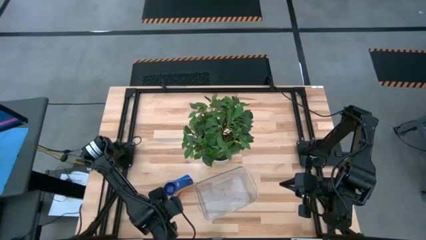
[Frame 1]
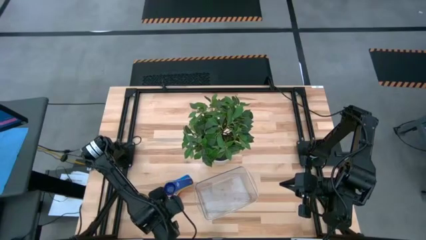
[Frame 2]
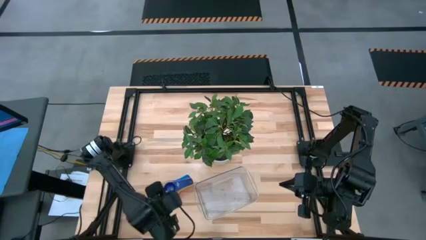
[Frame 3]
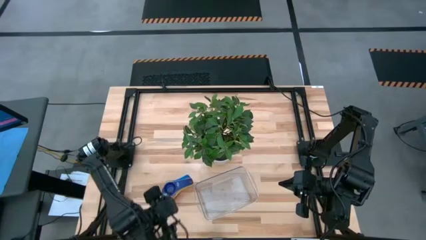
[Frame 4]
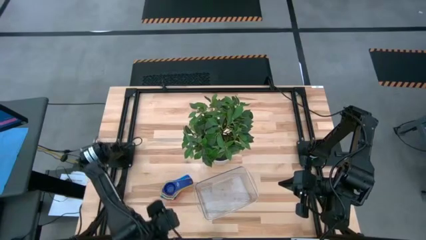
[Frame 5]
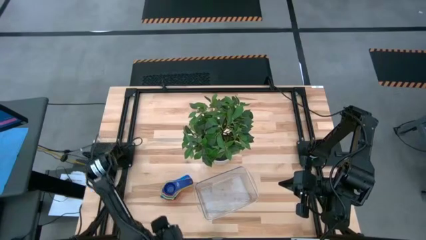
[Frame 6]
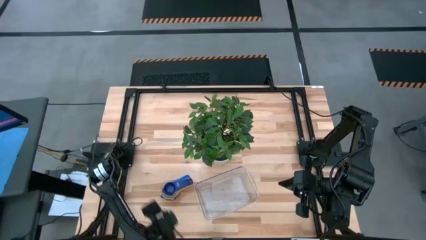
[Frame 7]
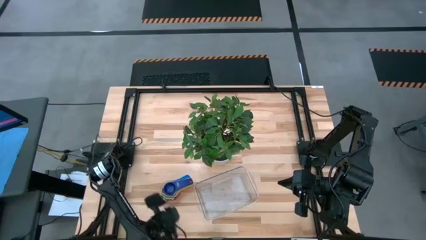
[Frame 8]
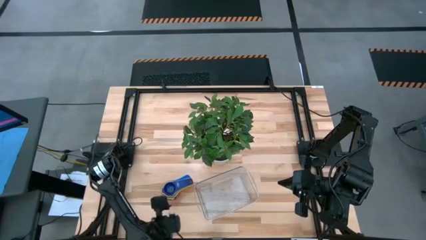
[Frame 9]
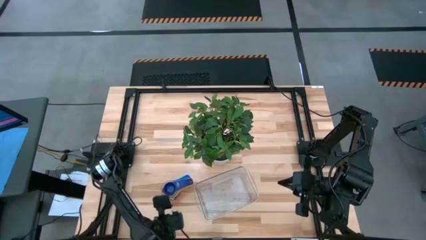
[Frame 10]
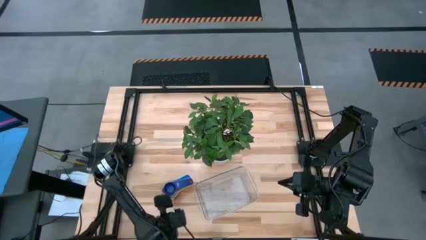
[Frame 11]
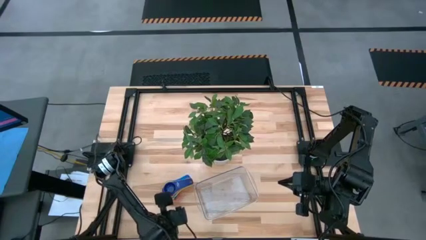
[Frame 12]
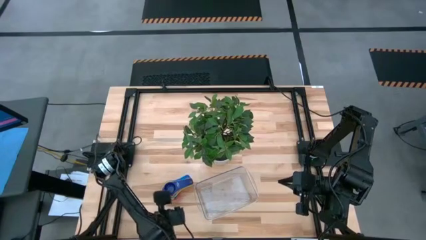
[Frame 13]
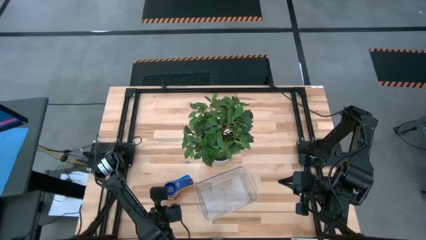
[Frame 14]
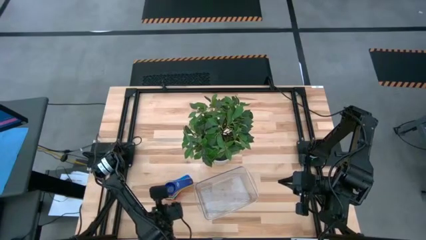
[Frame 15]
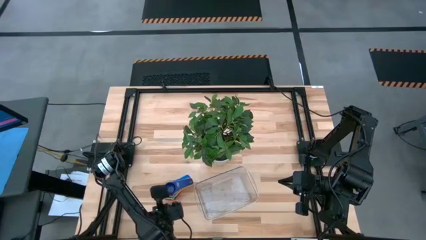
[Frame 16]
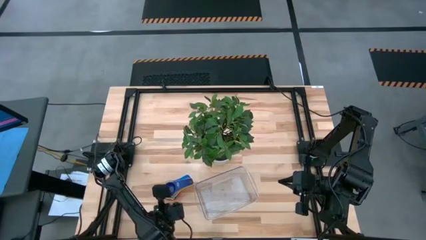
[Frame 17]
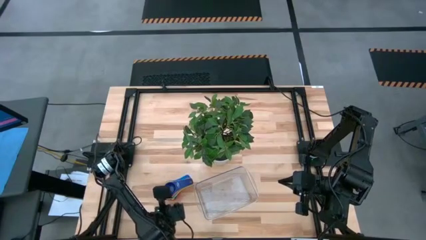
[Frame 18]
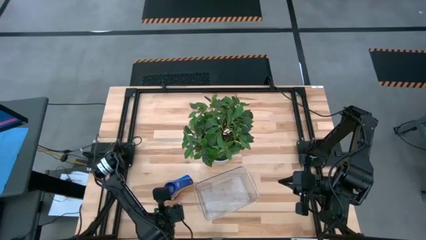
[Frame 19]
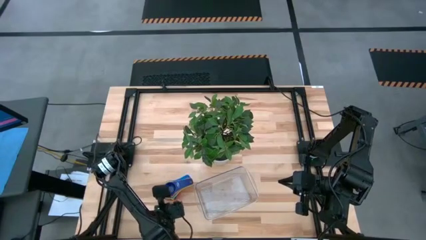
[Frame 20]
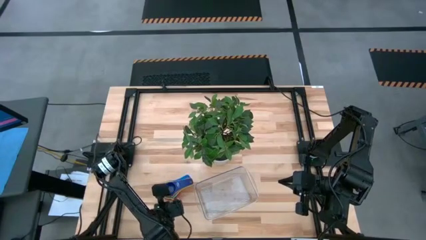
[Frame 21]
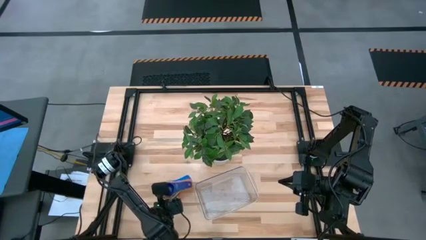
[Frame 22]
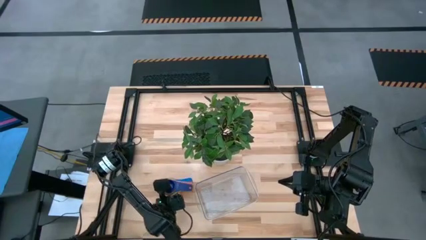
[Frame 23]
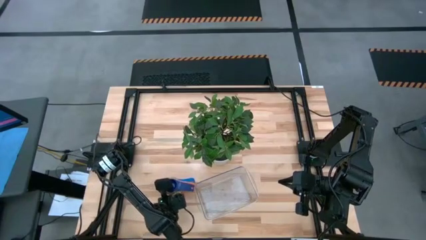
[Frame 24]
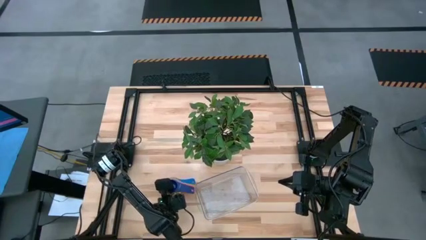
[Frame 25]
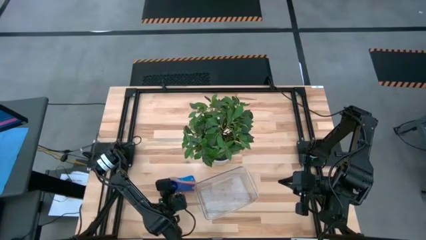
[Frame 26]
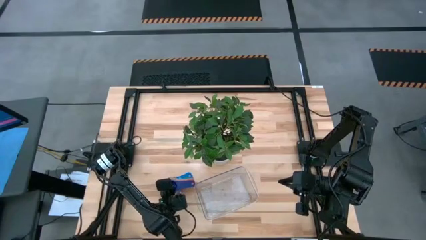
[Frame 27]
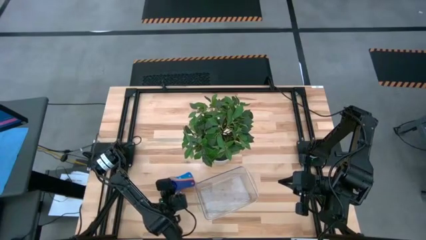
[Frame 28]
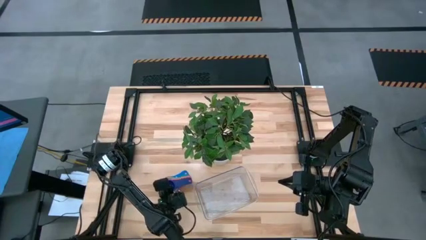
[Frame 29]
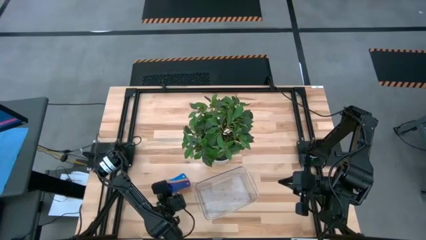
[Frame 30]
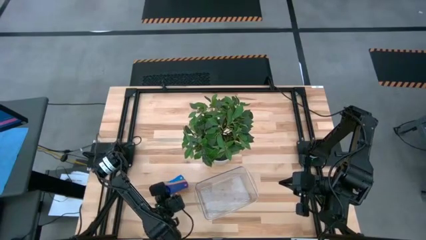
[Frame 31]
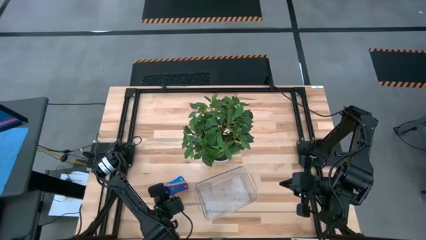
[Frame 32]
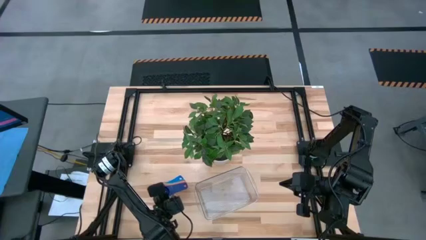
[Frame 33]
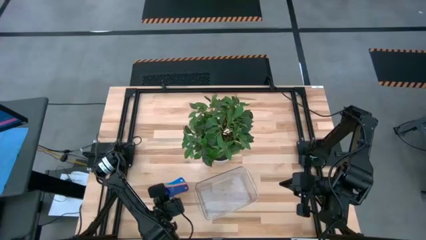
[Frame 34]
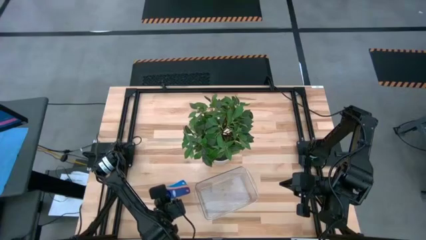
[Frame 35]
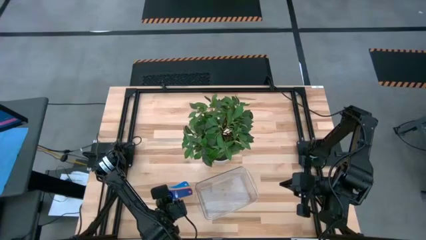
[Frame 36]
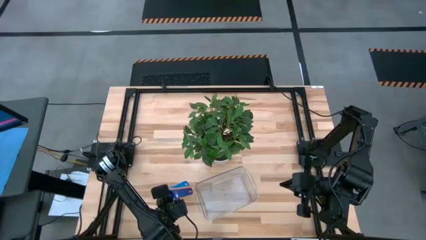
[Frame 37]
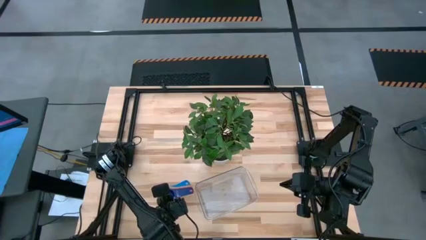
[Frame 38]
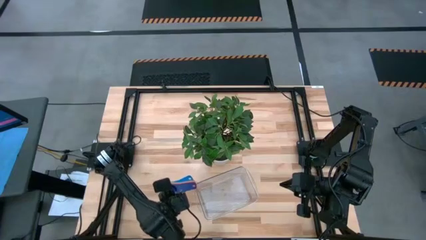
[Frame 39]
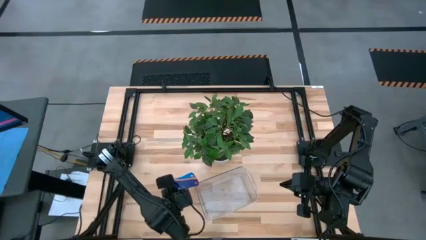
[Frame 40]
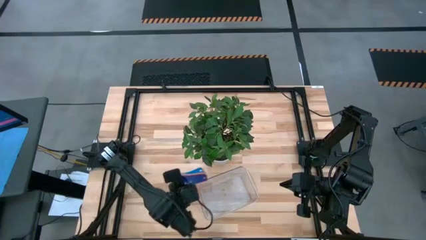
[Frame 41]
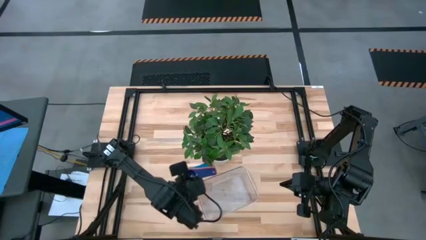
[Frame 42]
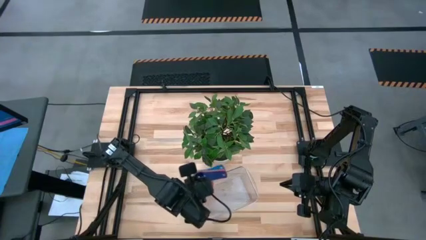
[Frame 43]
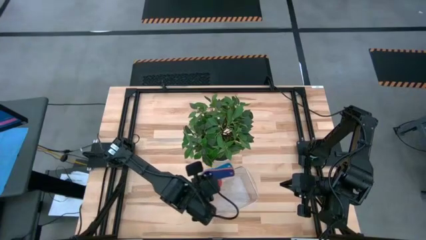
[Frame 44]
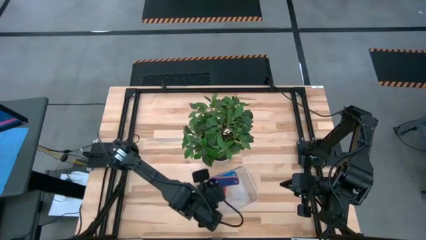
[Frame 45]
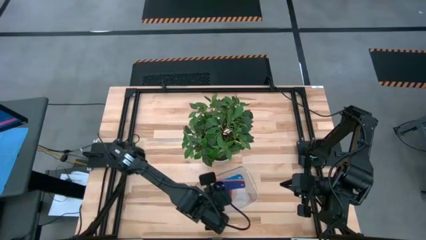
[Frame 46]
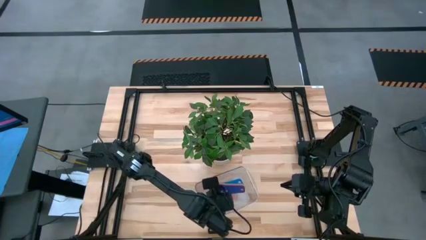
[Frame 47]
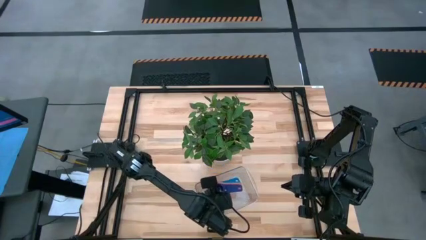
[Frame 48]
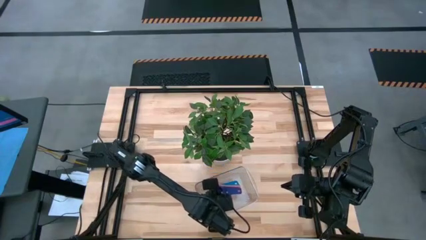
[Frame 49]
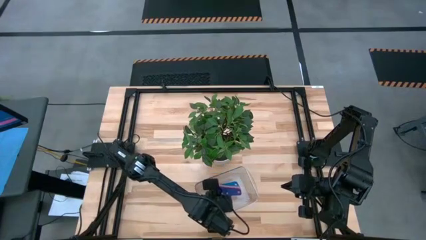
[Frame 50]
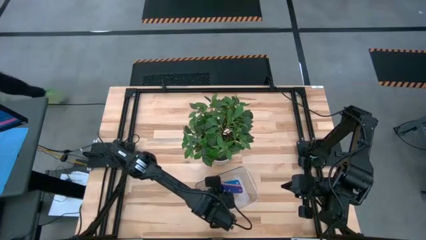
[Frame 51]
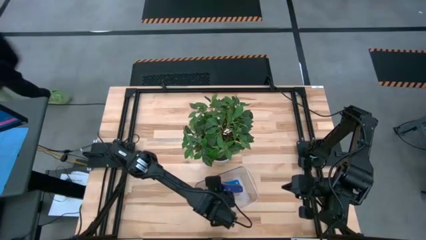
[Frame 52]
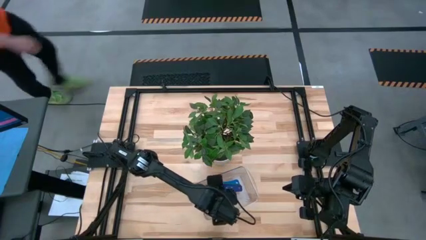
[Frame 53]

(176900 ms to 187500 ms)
Task: Nest measuring cups in basket
Put the stacked measuring cup into the transparent bin

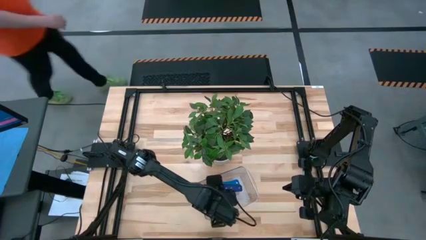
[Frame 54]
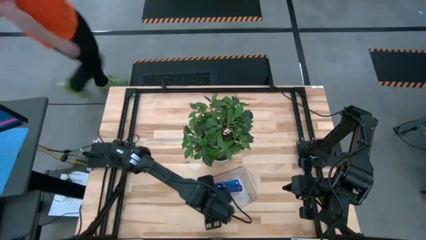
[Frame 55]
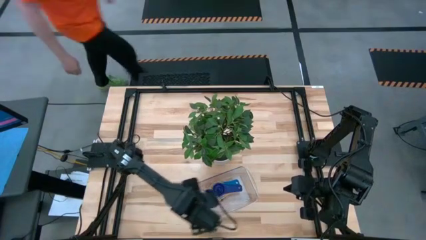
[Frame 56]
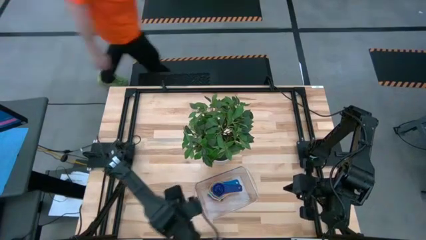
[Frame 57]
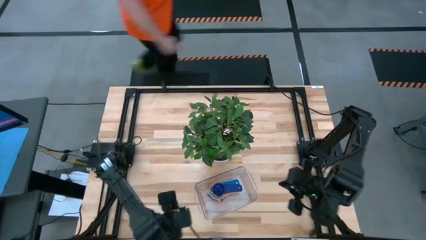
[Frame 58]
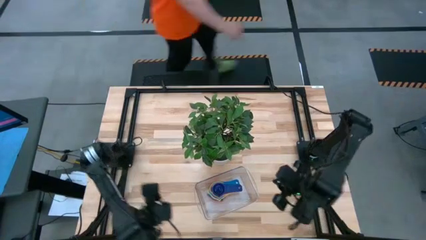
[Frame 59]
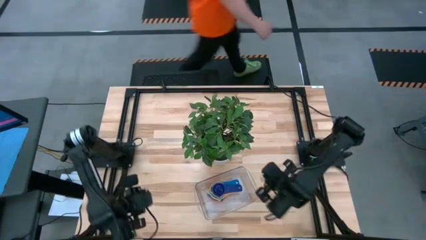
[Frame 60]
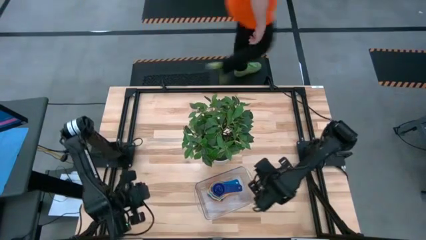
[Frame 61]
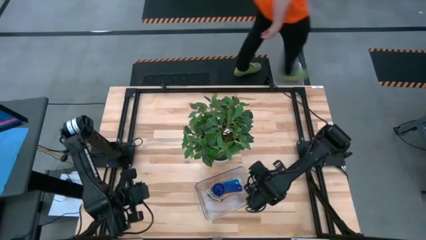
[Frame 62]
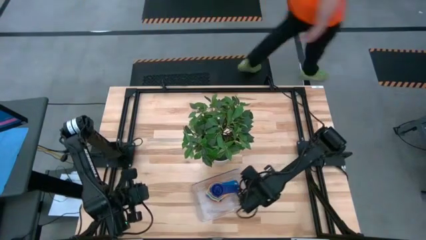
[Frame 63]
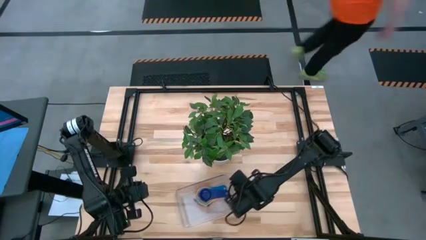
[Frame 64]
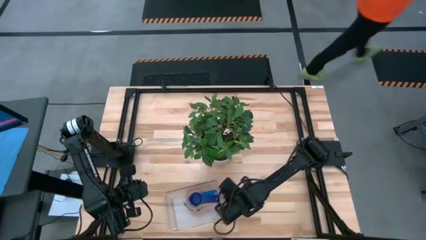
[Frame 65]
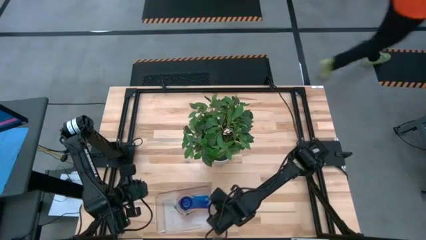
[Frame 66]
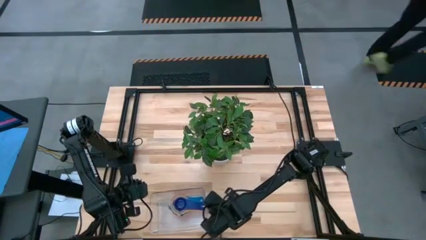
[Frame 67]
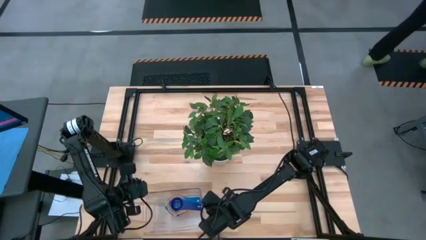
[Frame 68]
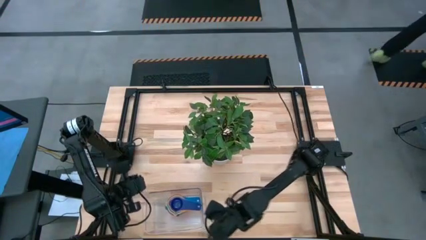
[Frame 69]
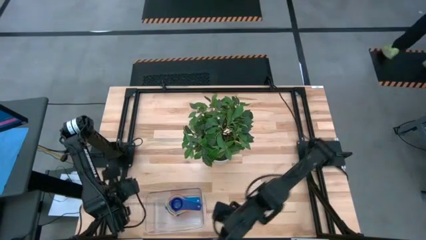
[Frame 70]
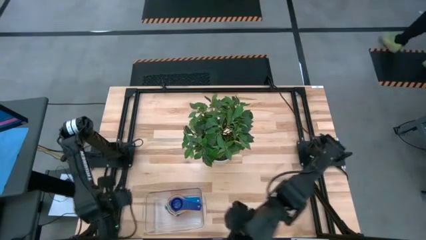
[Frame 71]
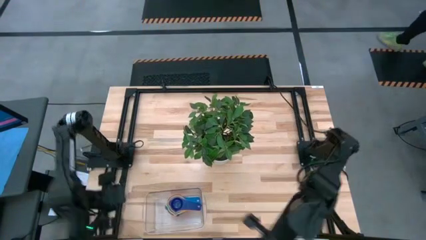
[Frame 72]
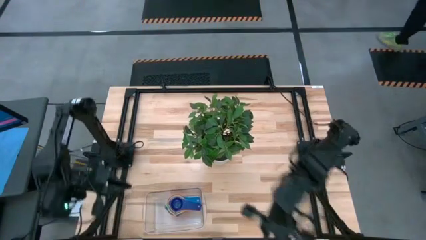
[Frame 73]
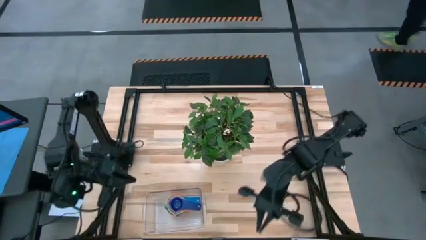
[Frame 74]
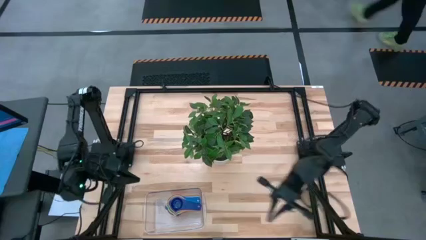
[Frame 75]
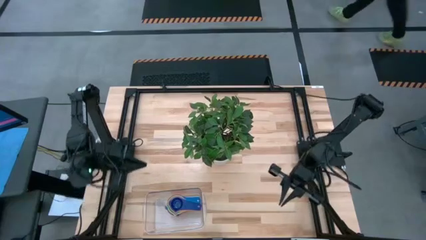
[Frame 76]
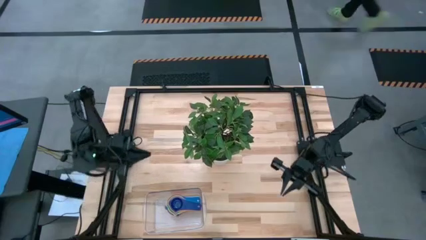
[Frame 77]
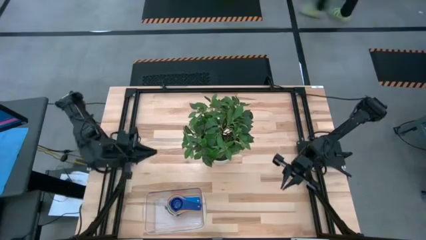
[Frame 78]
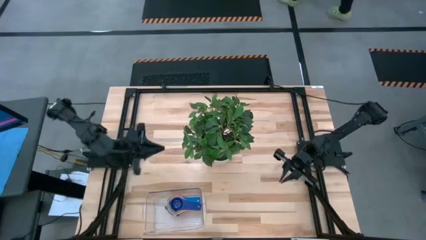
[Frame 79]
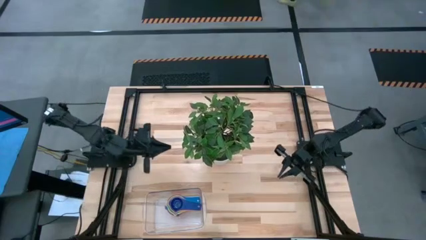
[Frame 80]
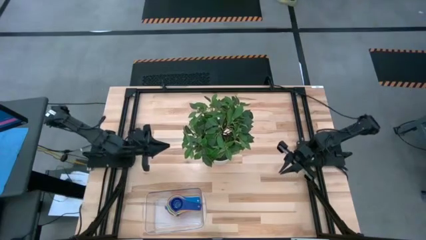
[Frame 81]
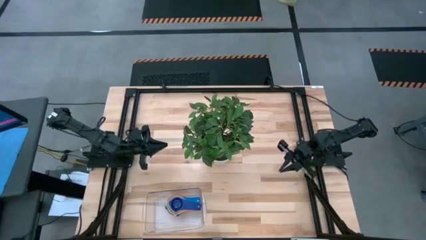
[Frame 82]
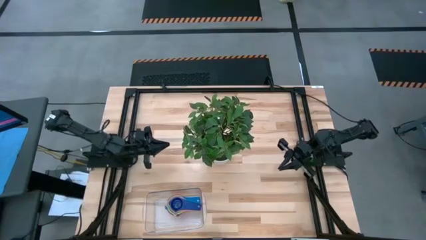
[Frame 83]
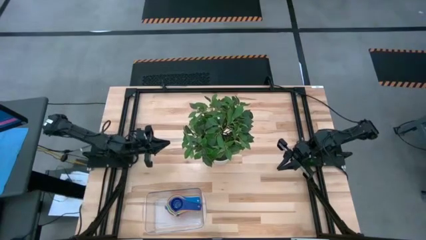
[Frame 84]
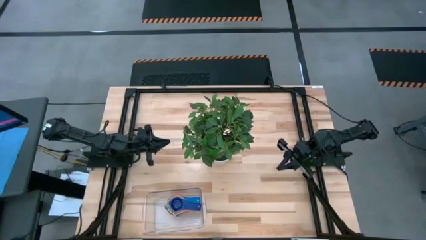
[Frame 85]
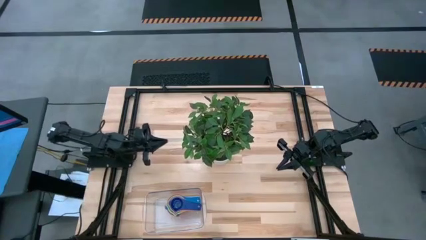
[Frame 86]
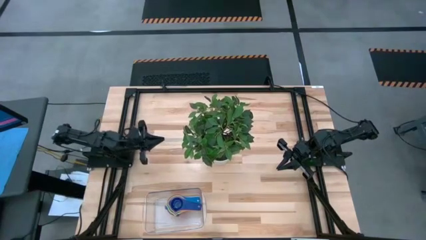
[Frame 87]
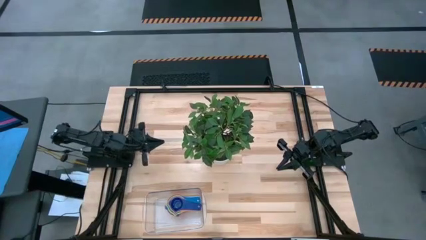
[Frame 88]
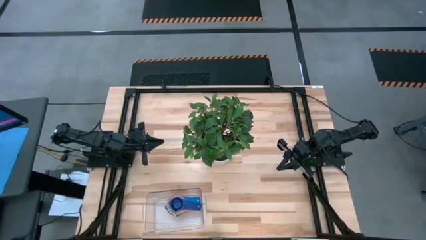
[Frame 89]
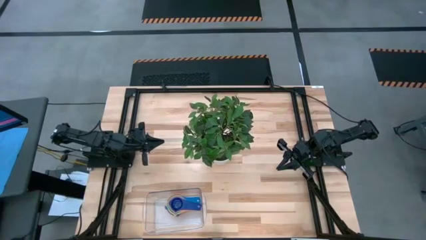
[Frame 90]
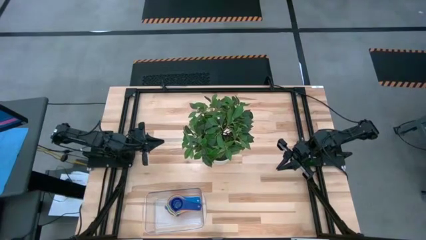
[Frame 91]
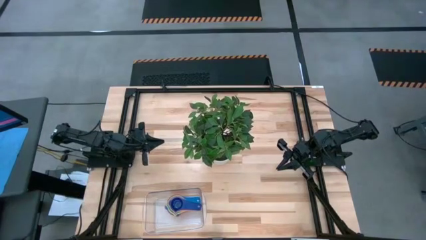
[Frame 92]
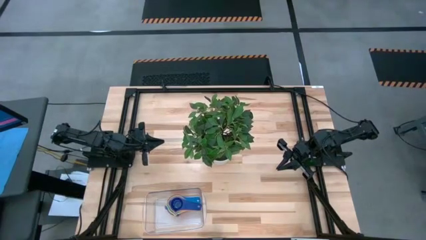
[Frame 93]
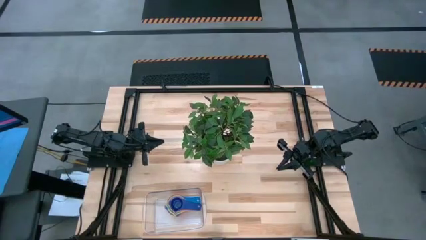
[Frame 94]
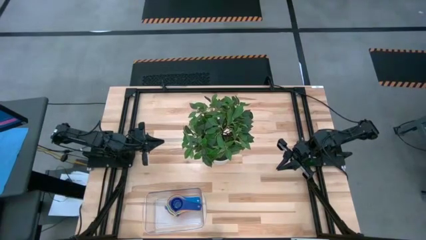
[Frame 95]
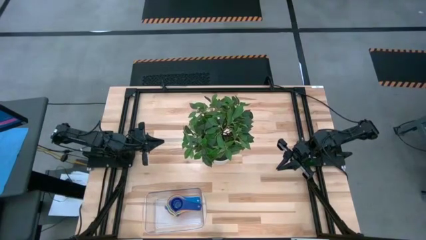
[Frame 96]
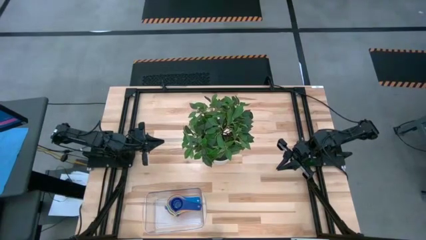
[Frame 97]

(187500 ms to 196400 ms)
Return to Home Position
